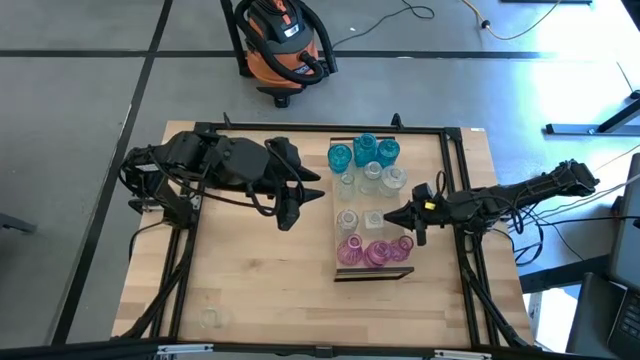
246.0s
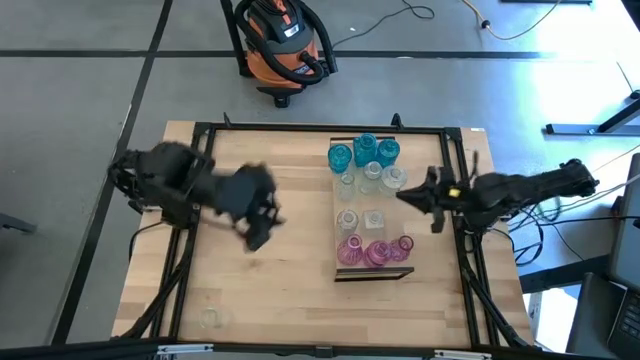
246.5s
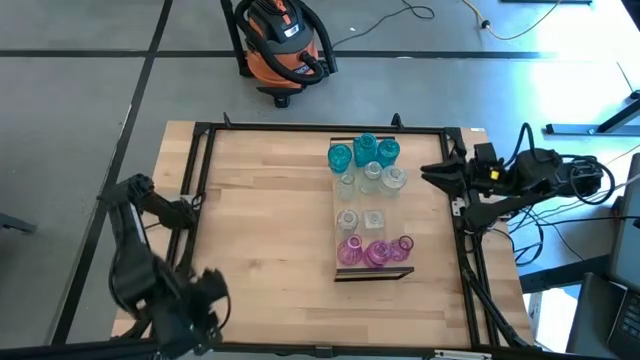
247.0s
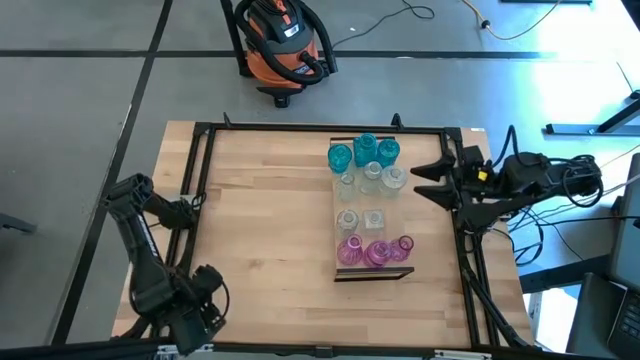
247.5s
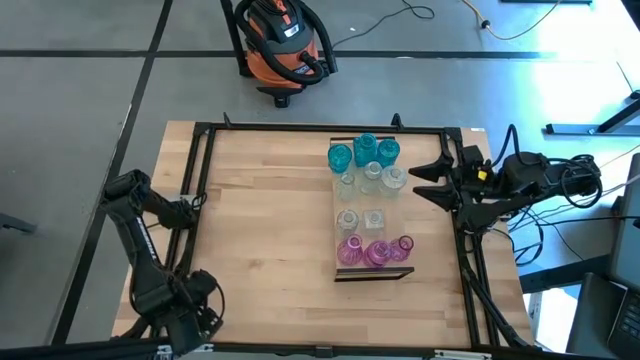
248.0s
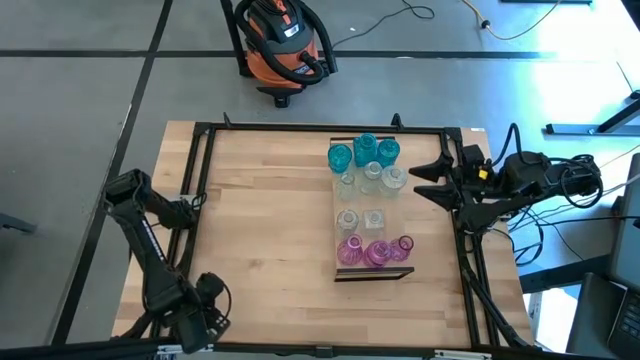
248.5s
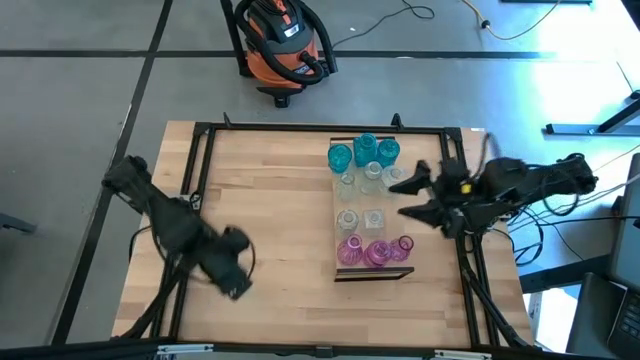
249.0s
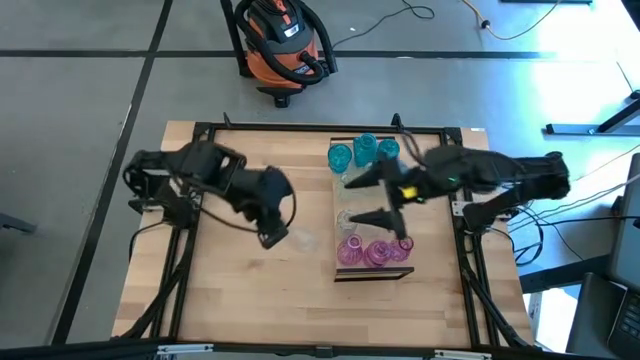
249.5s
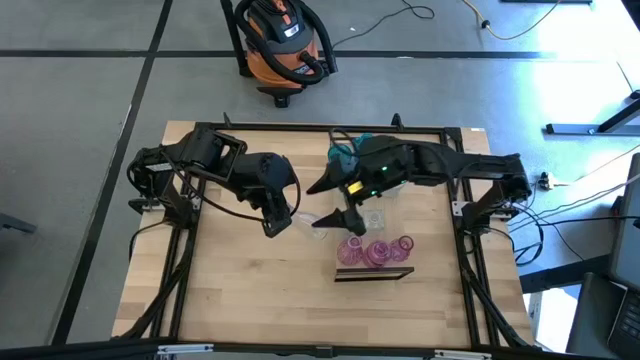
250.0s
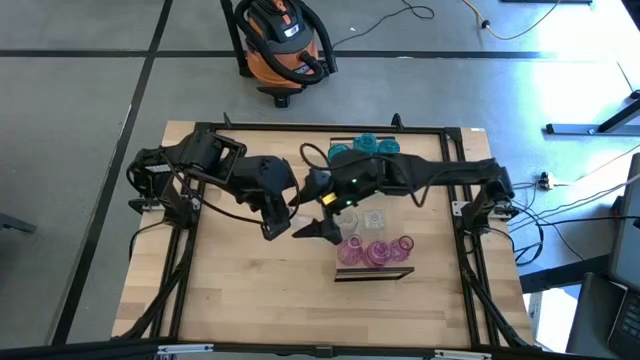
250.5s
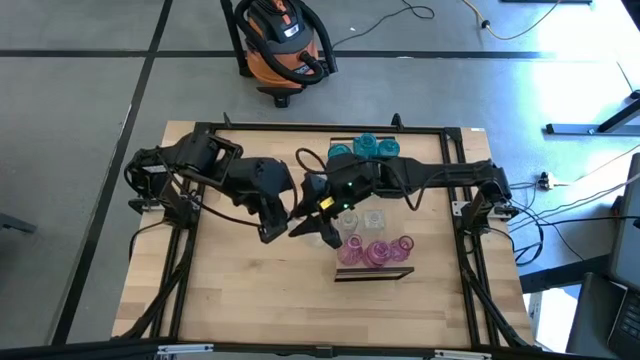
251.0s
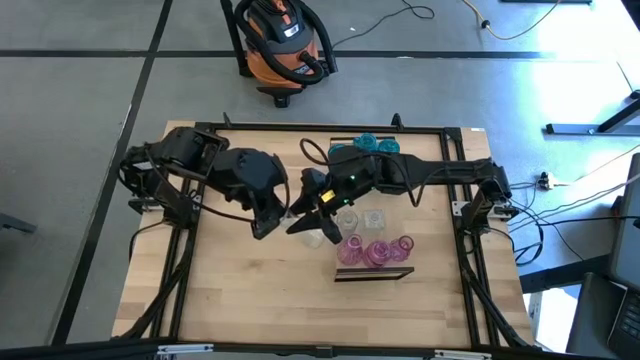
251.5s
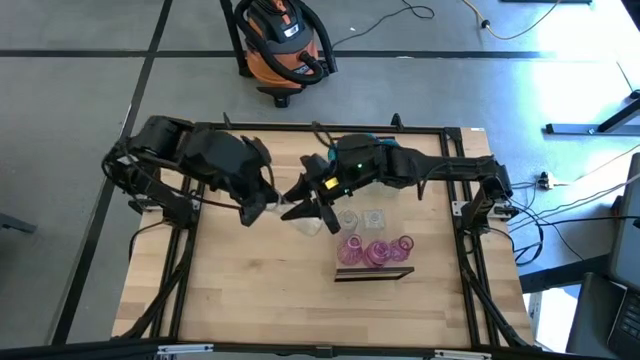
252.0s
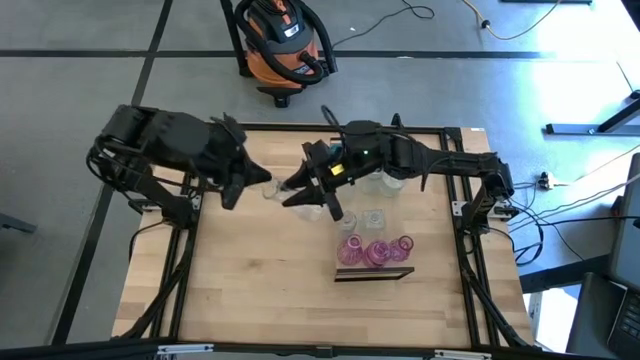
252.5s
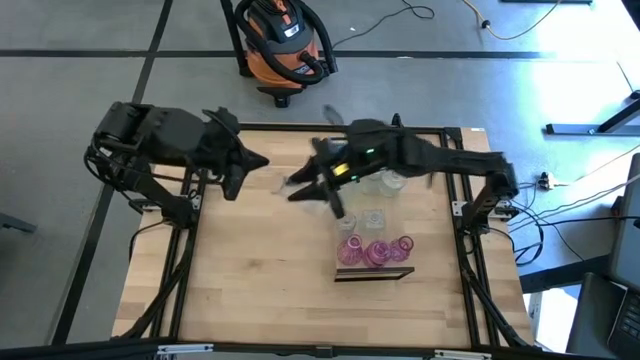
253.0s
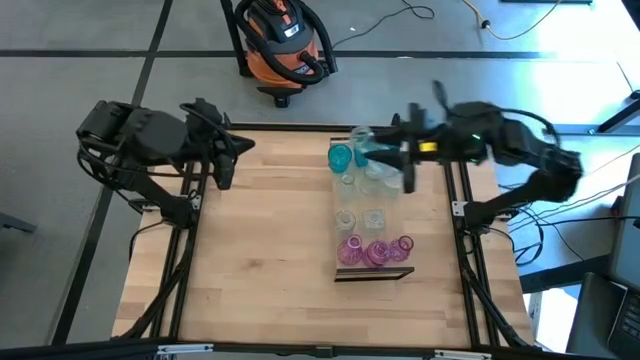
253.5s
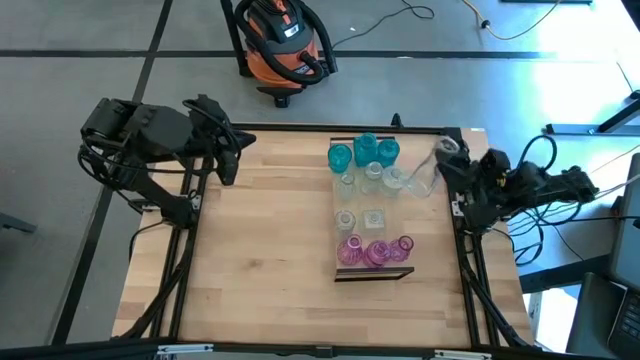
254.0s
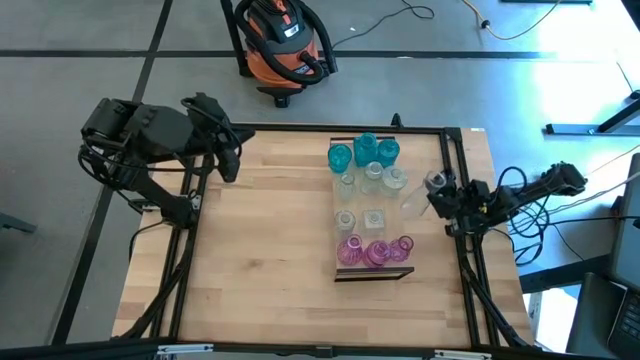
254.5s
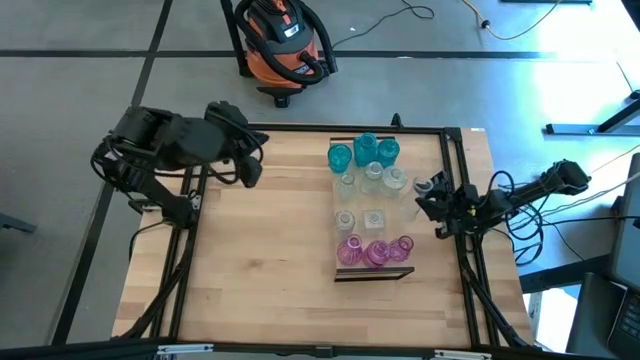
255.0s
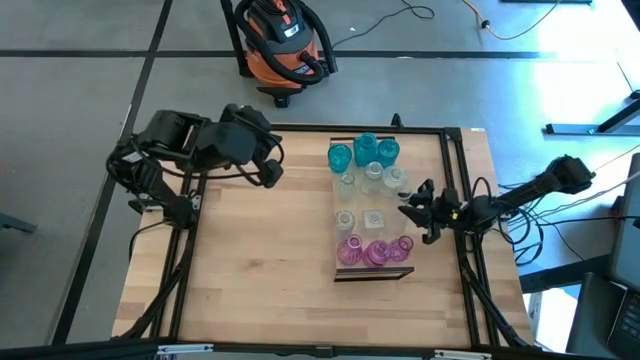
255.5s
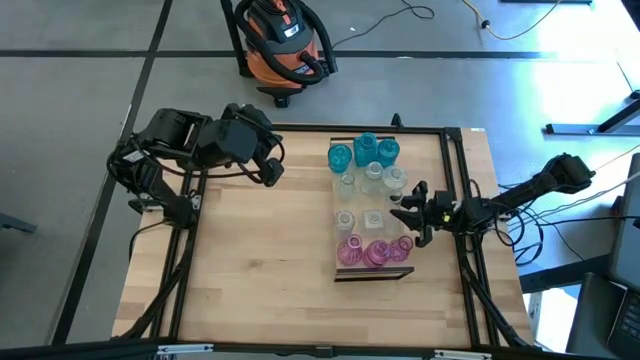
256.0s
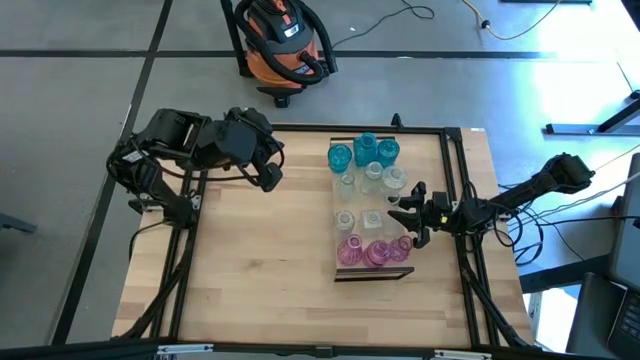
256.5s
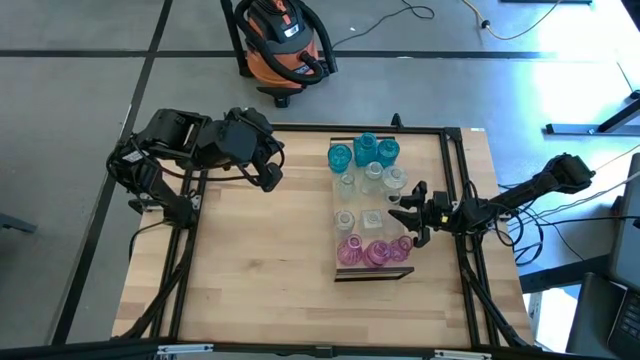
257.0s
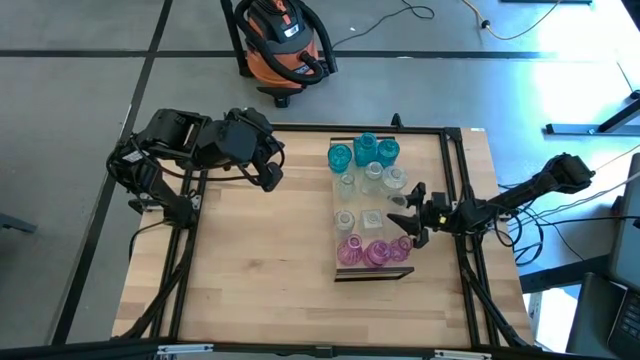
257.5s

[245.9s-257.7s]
Task: sort vases onto shelf
Put the transparent vase on the shelf aligned with the other transparent vase

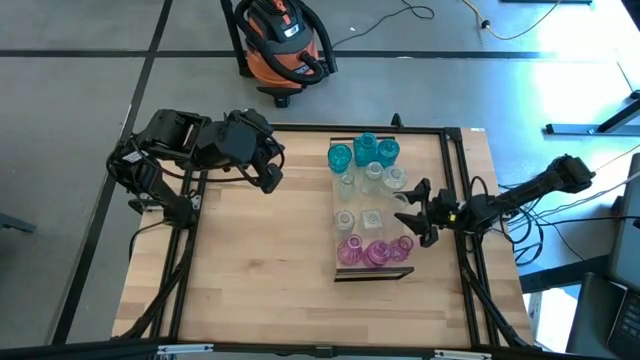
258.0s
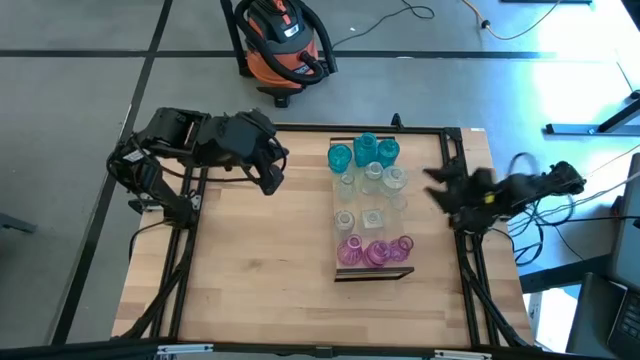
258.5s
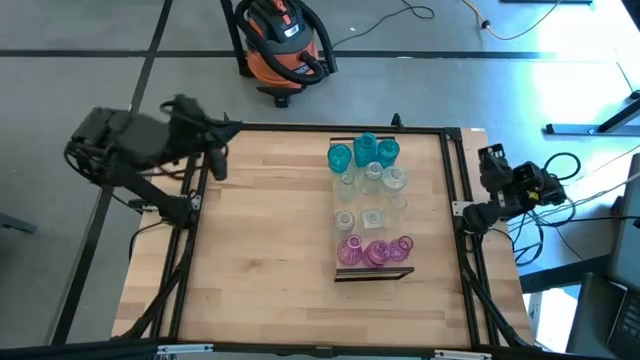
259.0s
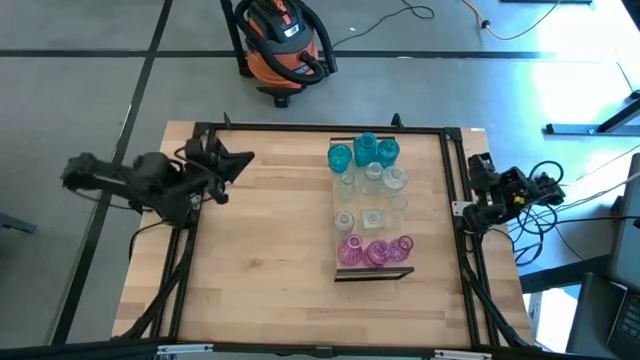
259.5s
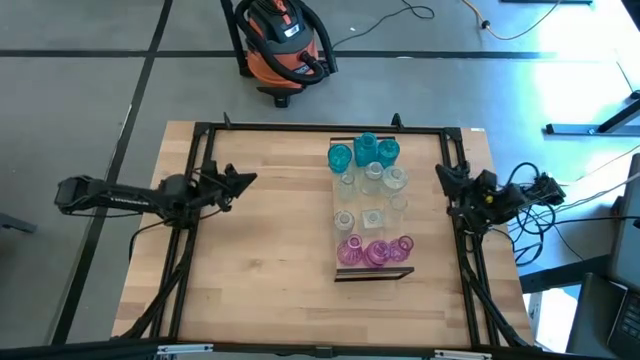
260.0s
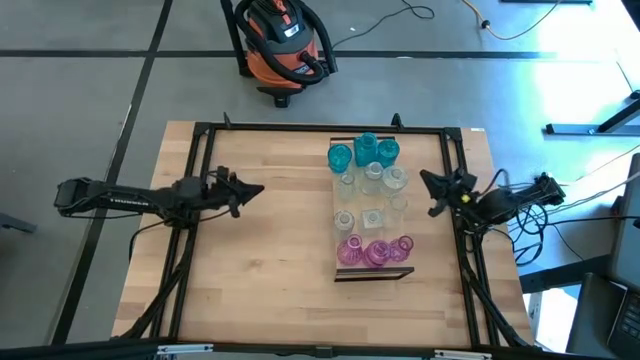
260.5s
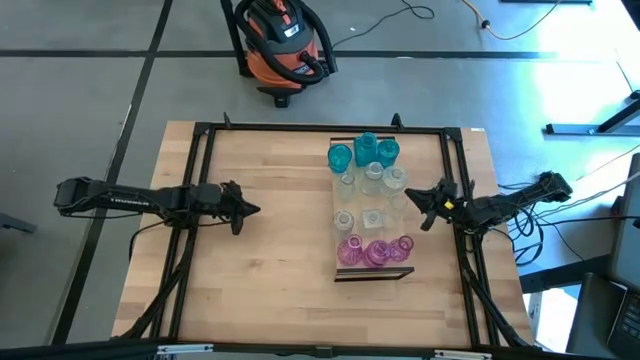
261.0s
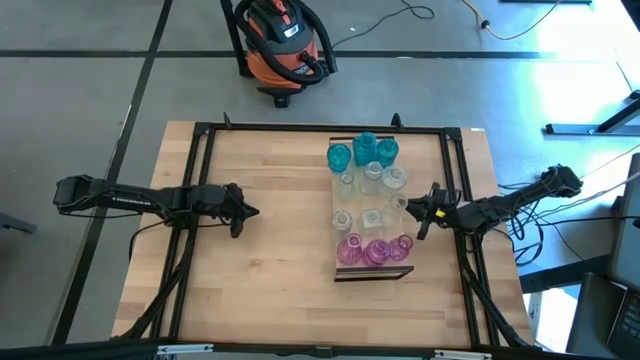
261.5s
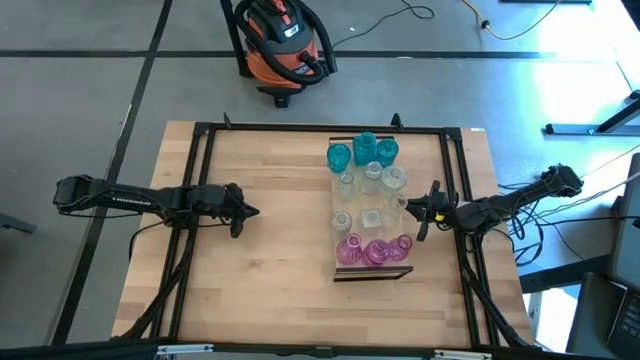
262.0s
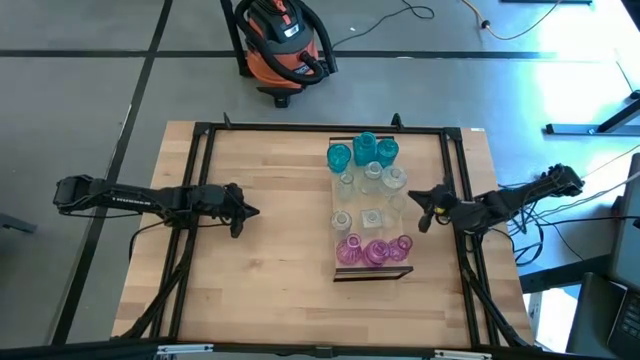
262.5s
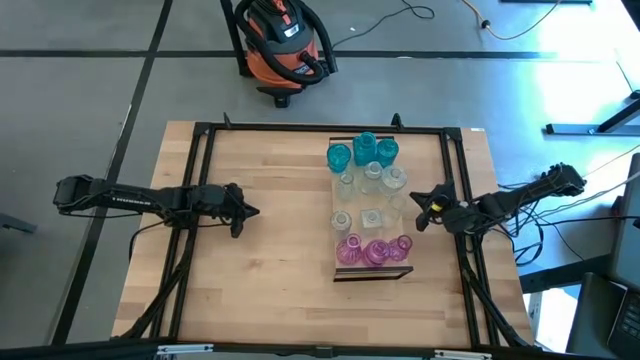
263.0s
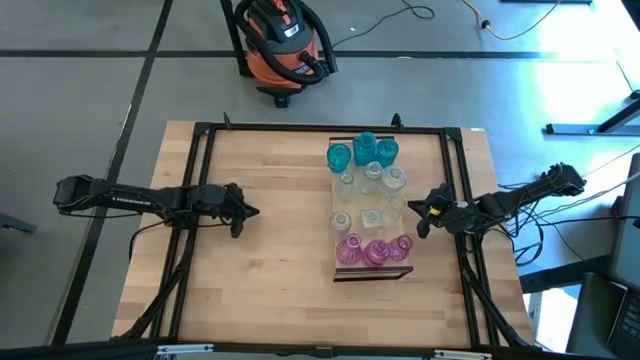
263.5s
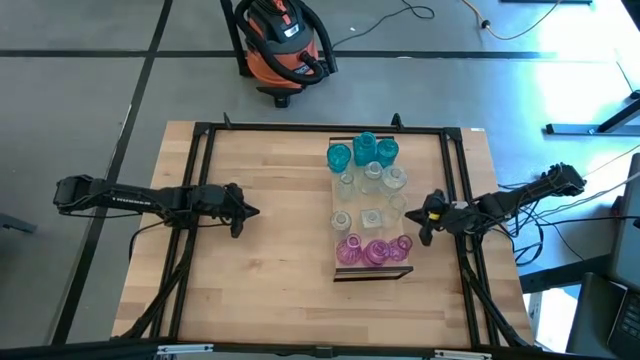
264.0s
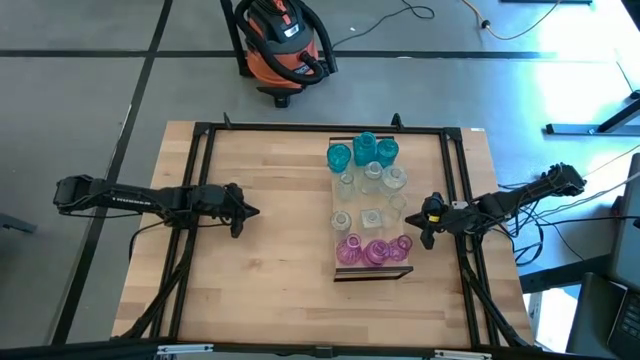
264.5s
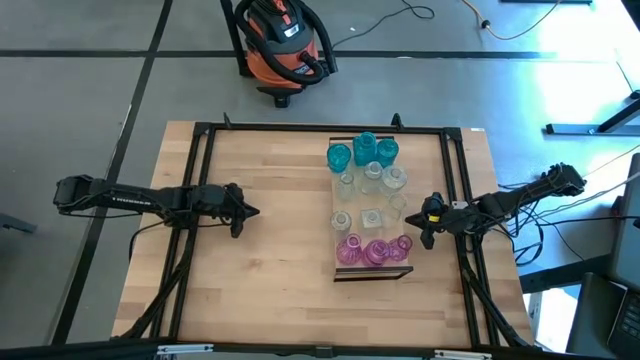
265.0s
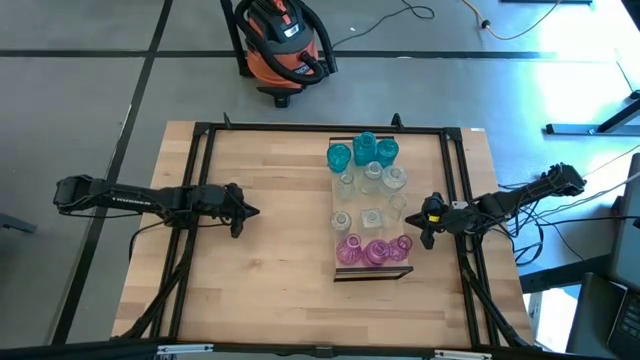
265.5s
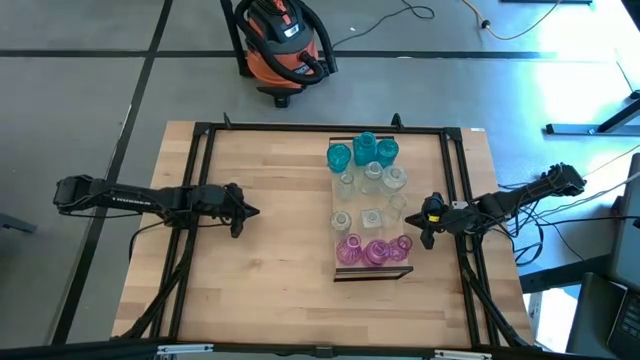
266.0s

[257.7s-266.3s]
Return to Home Position

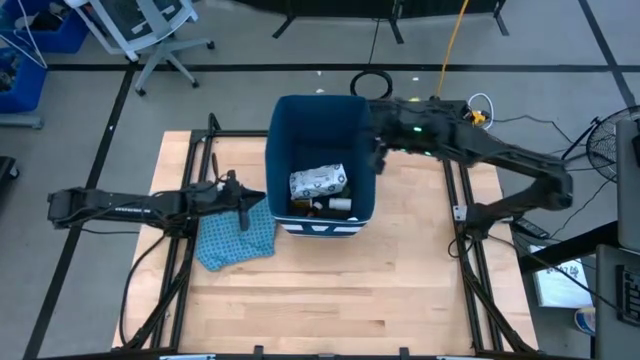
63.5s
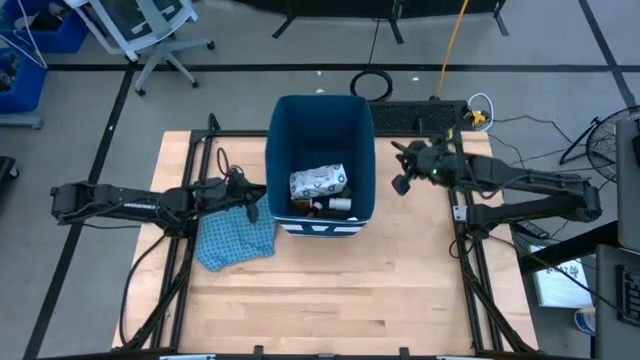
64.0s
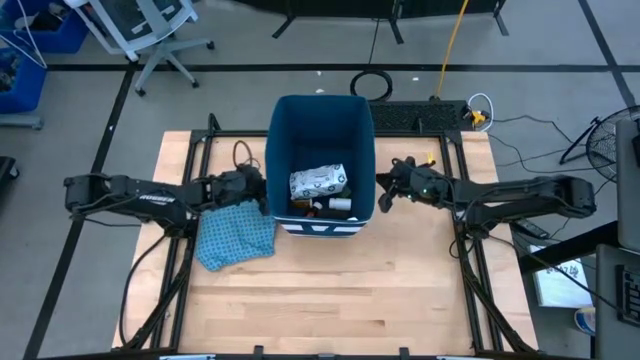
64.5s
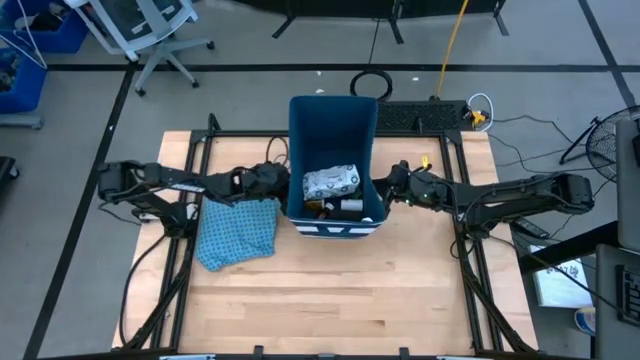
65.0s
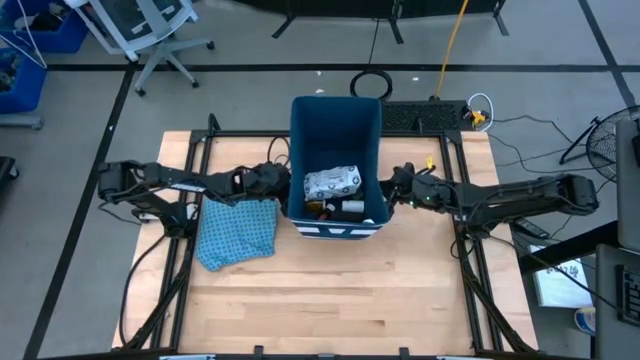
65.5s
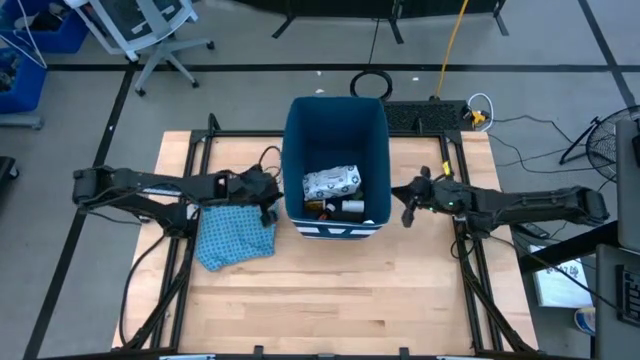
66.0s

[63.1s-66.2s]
Task: Pick & place medical supplies in basket/bin
Adjust the blue bin
